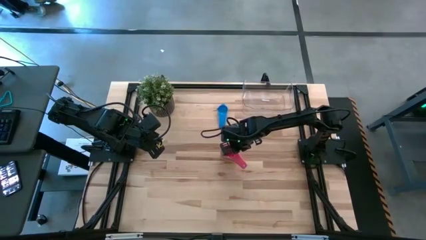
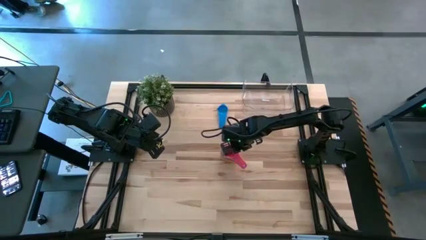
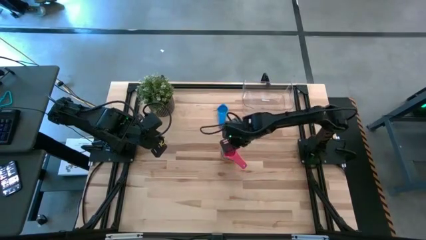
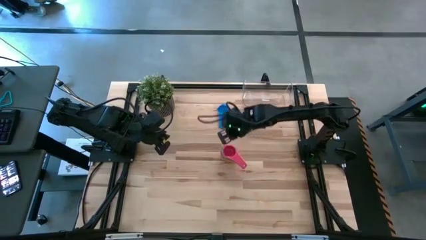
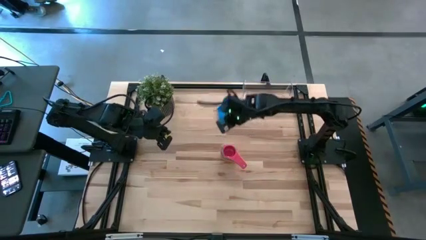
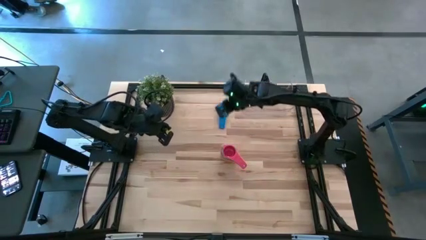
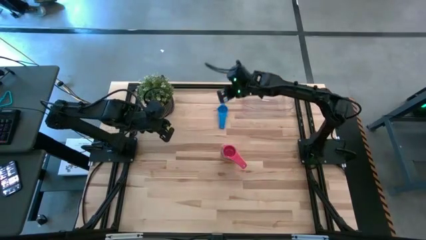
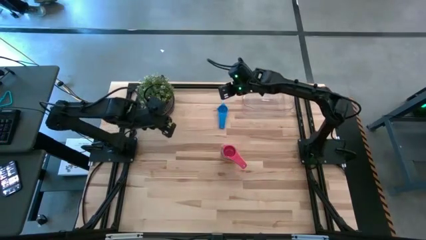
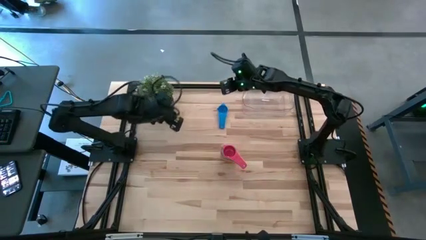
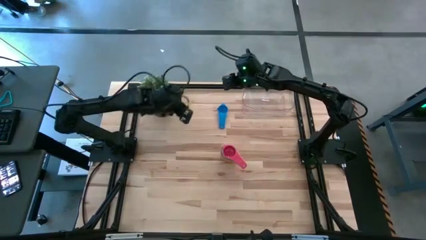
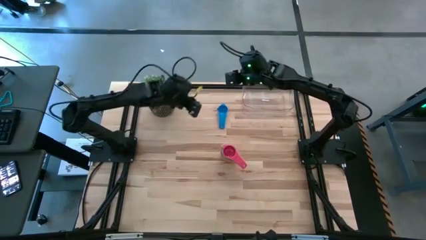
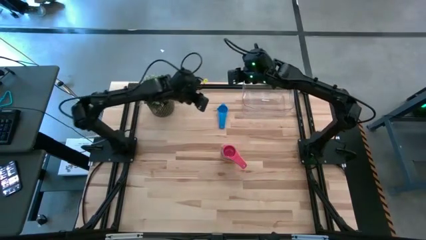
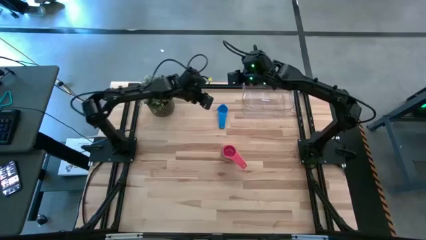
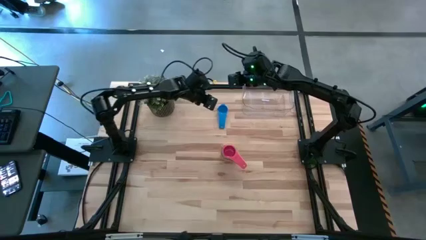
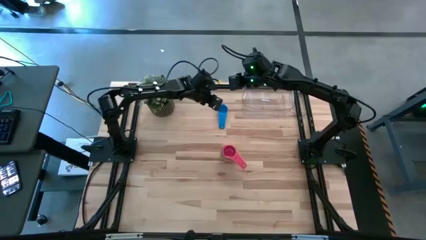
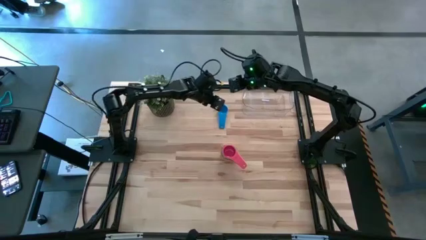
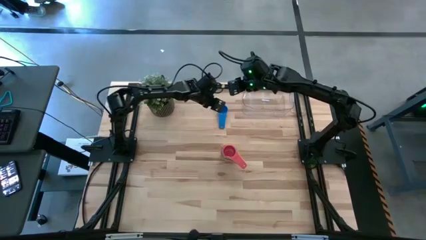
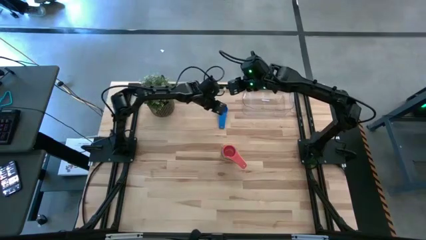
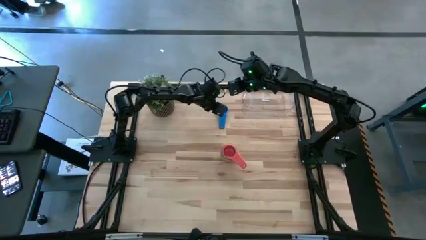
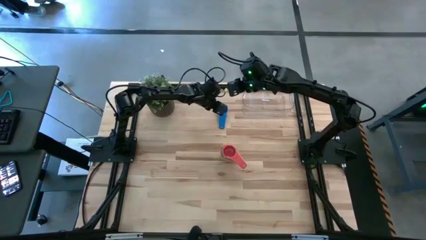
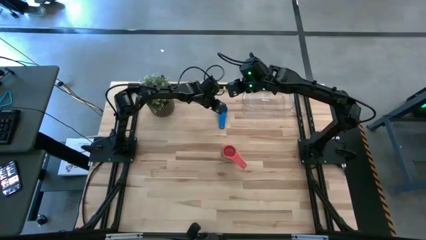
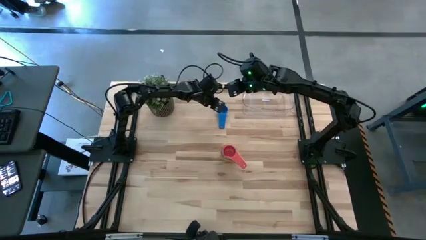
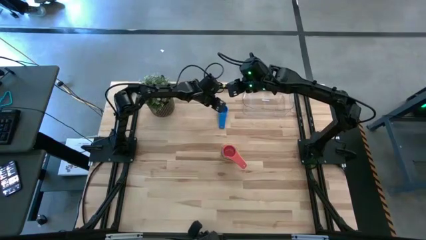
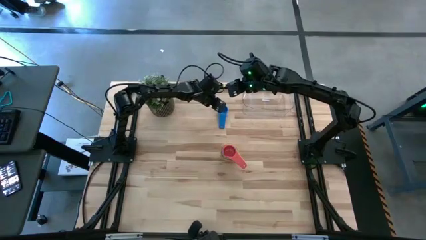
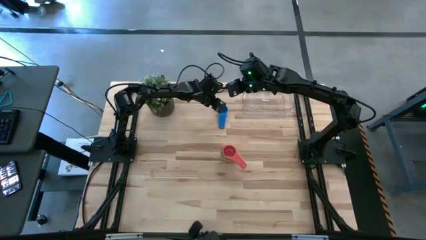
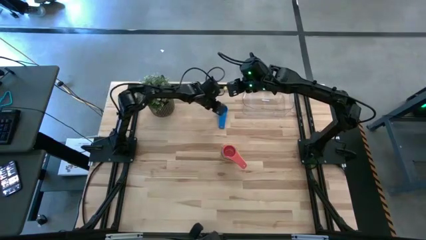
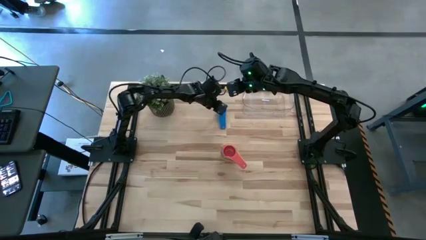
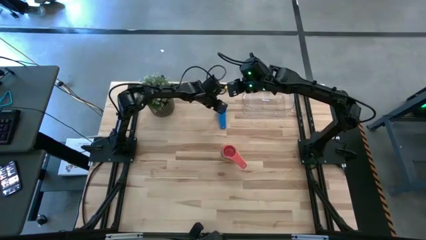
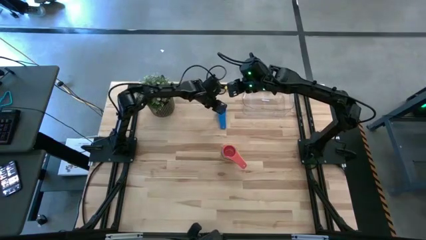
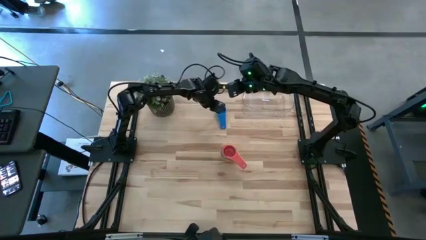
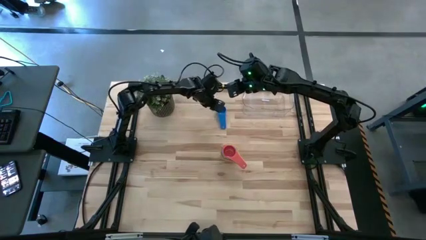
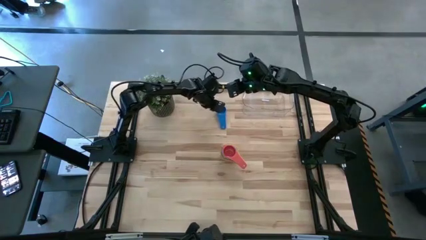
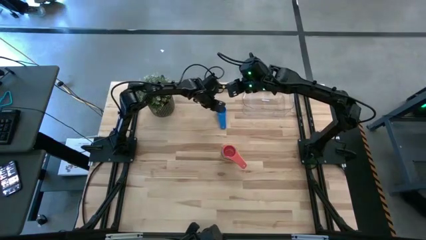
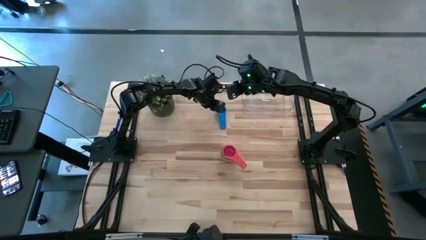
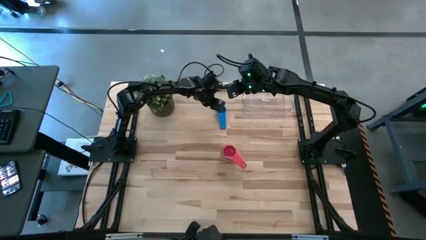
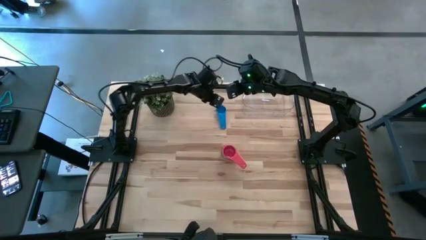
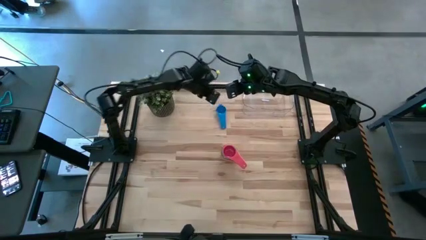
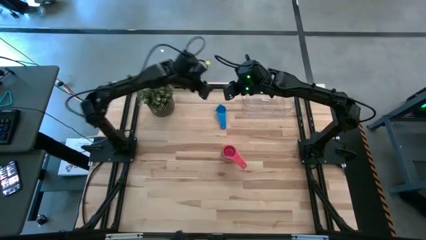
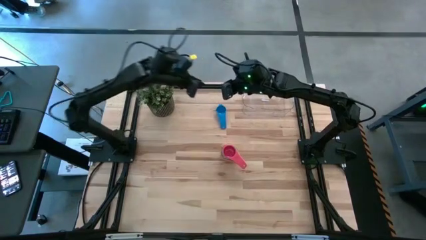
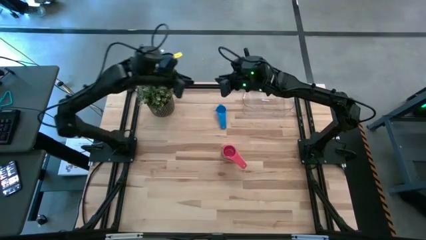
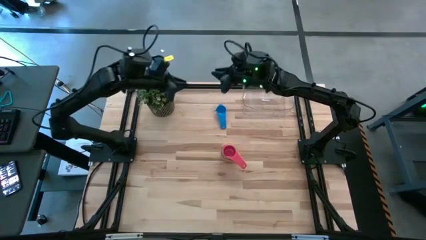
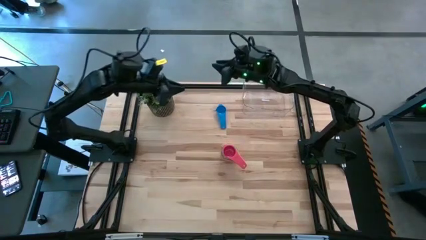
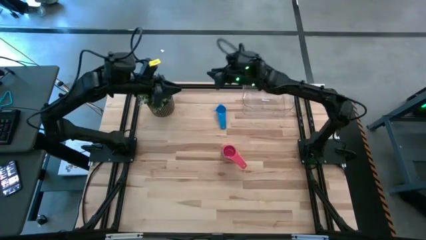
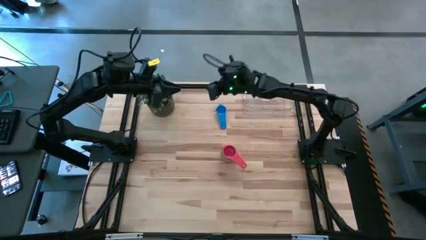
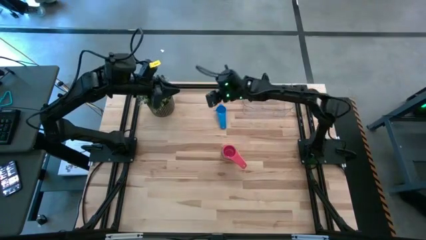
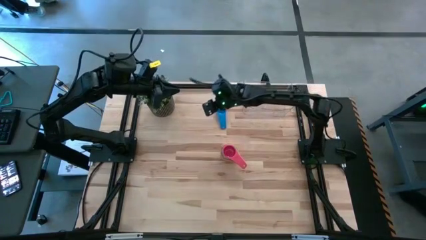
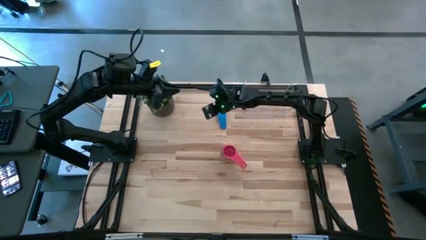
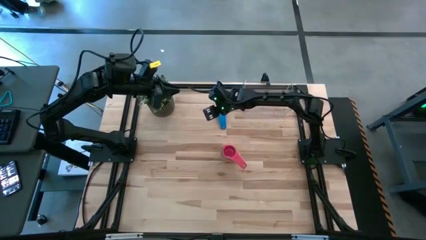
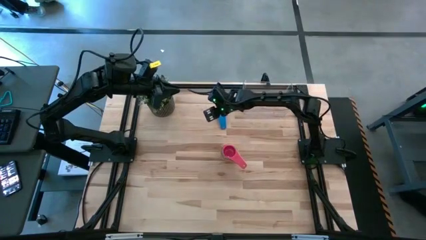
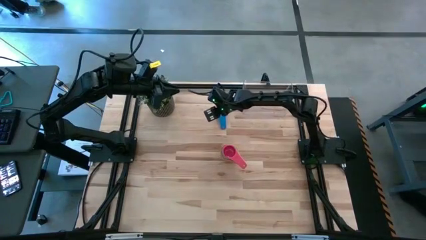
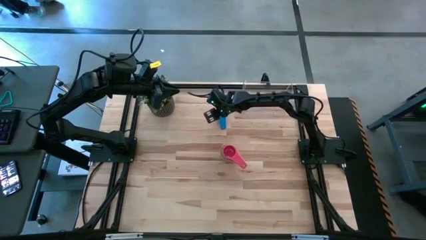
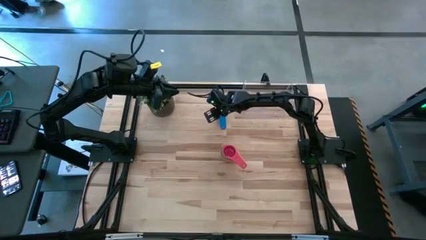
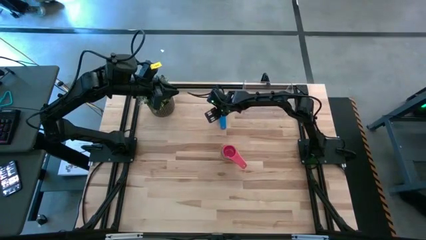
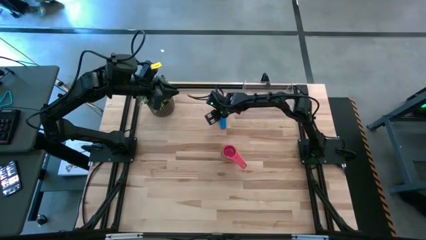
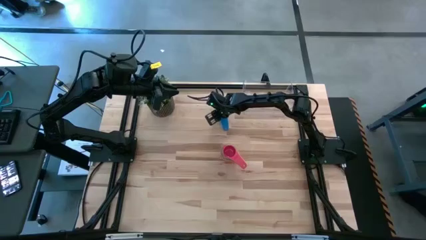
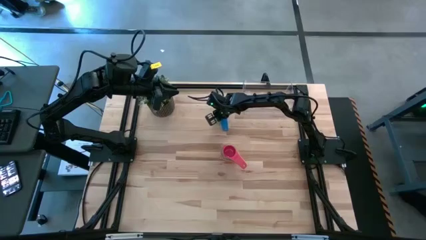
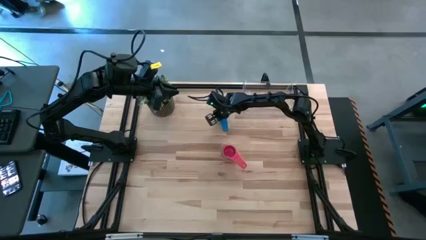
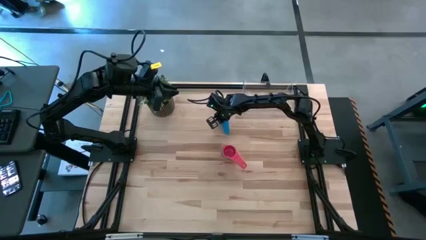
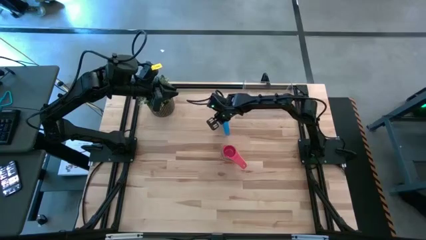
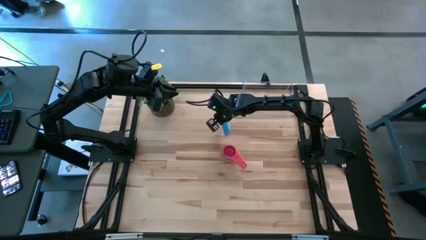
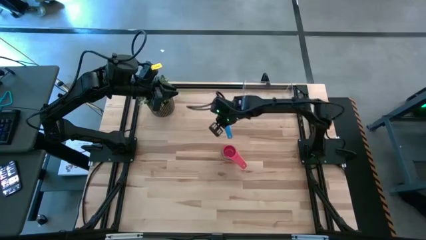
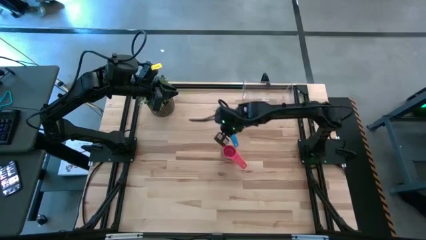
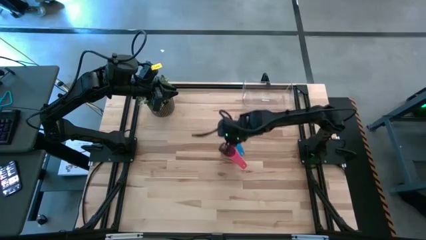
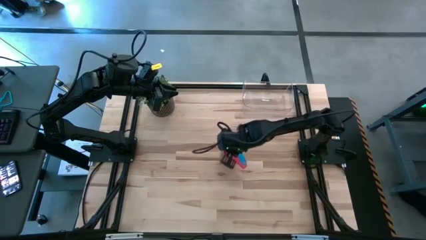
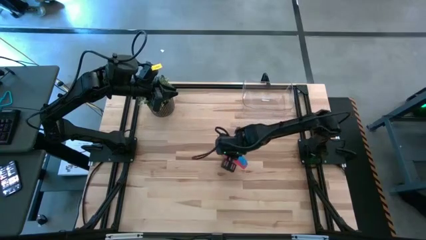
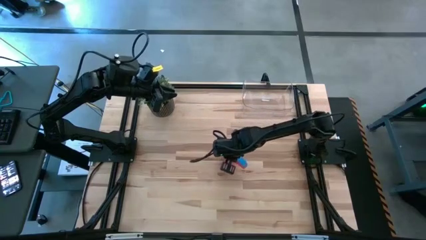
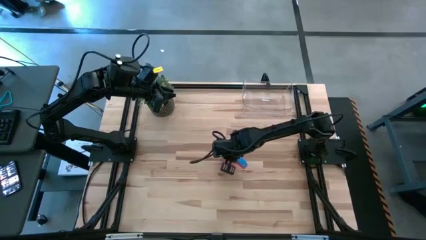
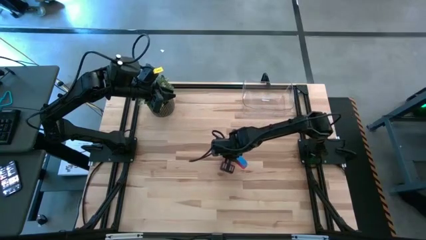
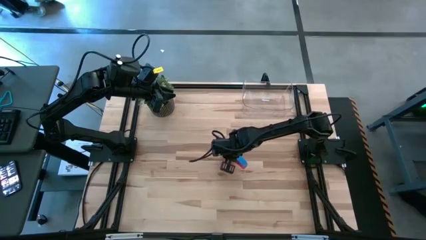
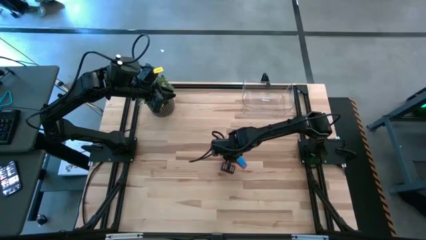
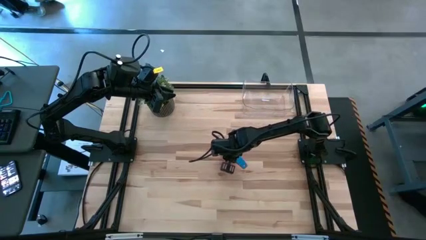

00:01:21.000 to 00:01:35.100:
Task: Nest measuring cups in basket
Stack the blue measuring cup into the red measuring cup

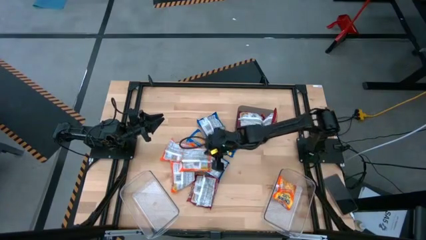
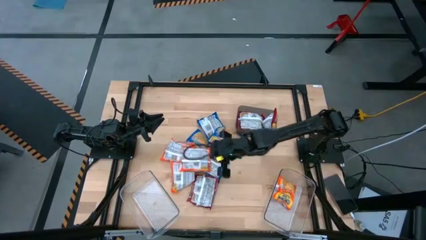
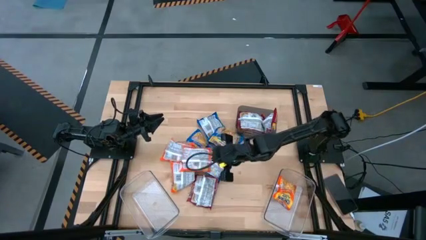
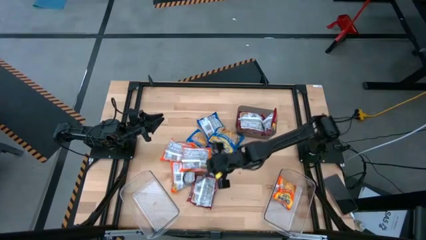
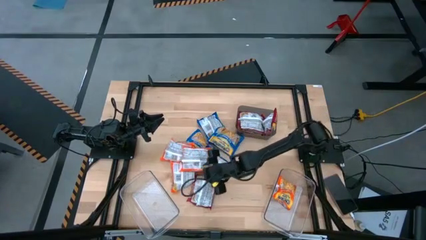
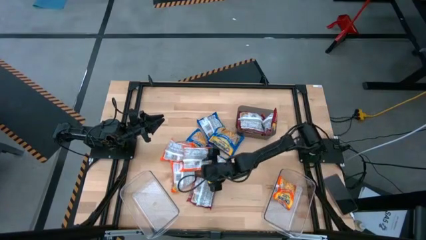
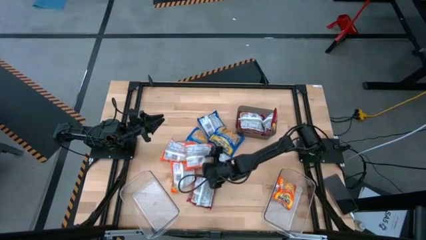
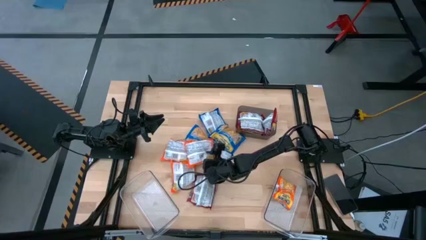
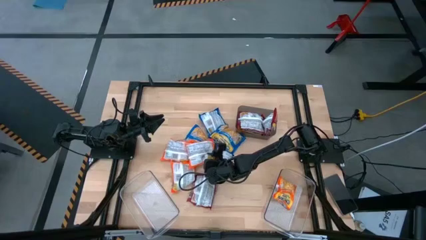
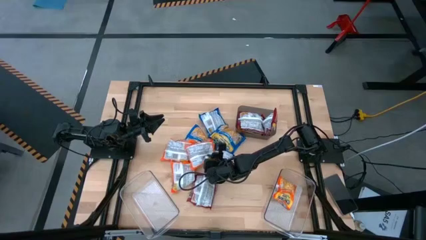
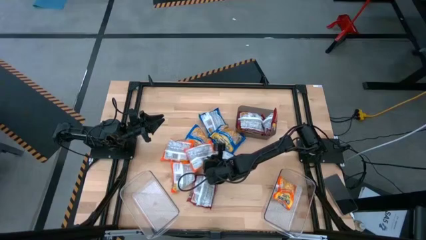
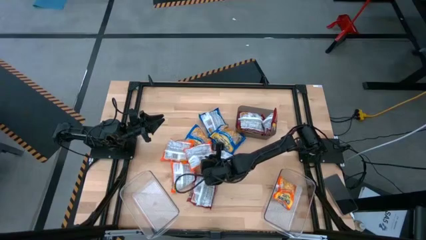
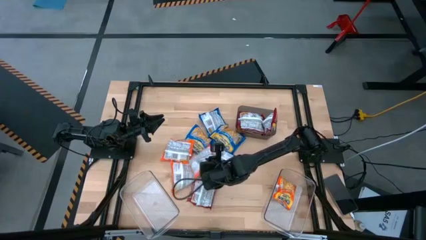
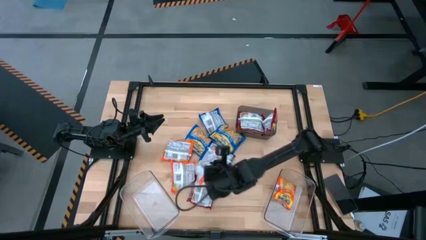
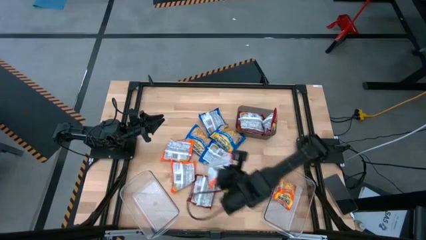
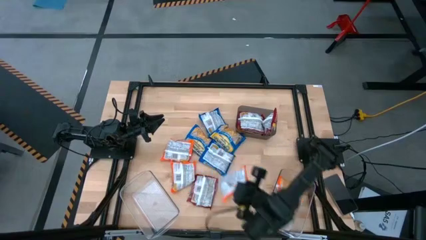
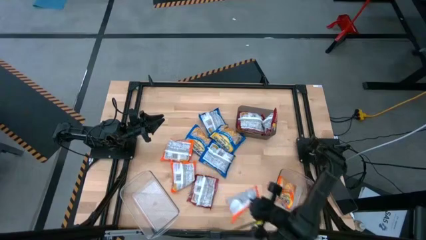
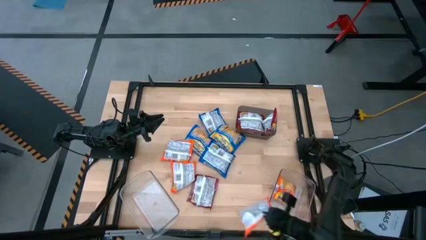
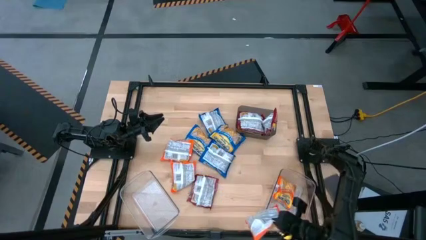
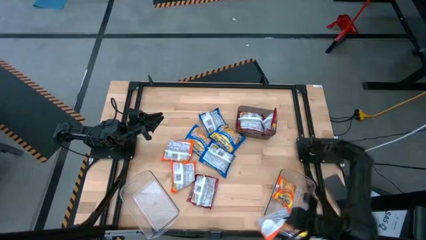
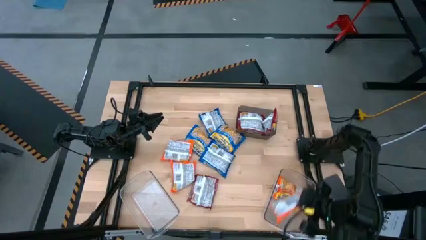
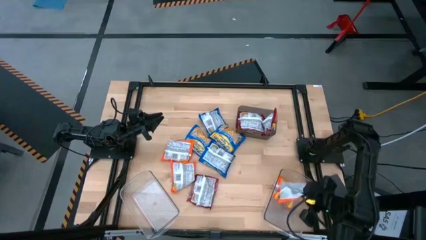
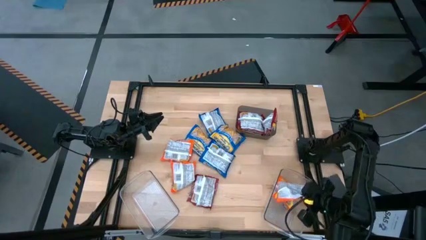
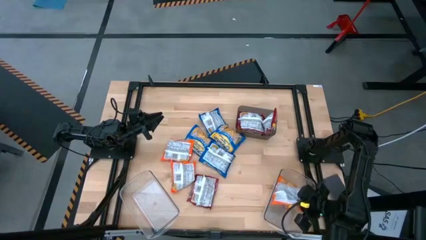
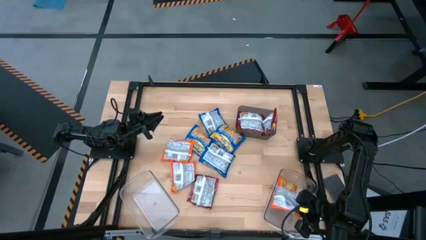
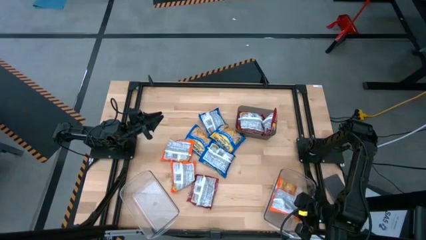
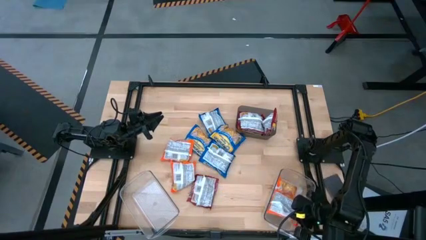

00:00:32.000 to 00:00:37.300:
Task: Sort Maruchan noodles
Put the orange noodle pack into the right transparent bin
